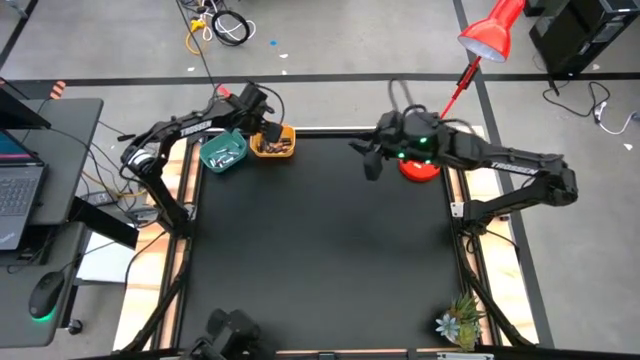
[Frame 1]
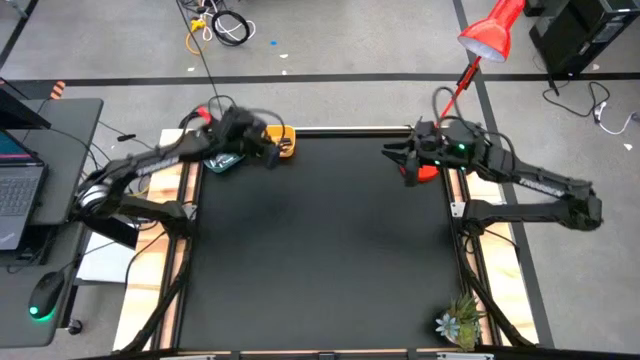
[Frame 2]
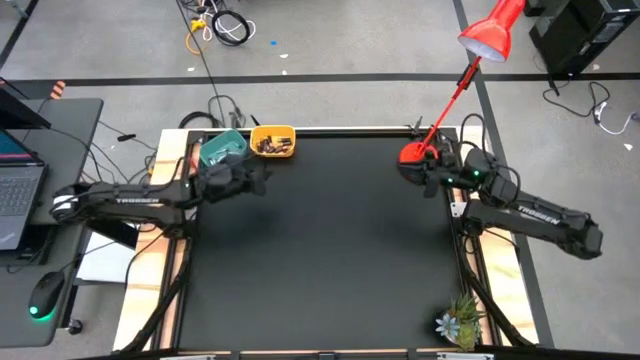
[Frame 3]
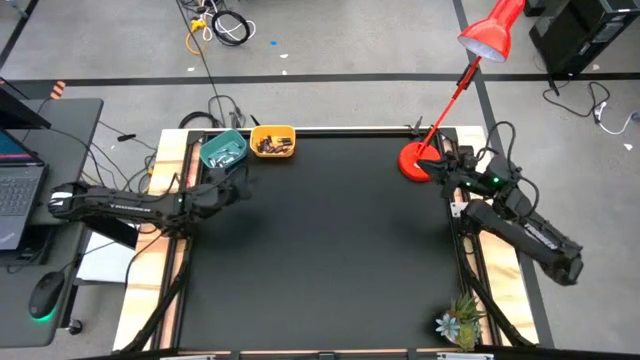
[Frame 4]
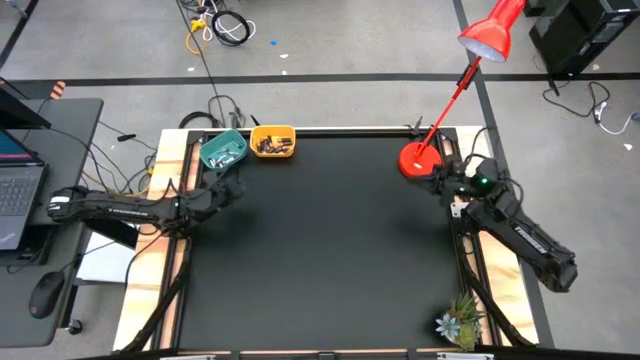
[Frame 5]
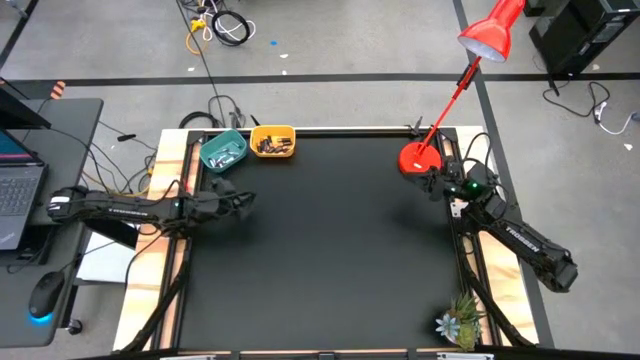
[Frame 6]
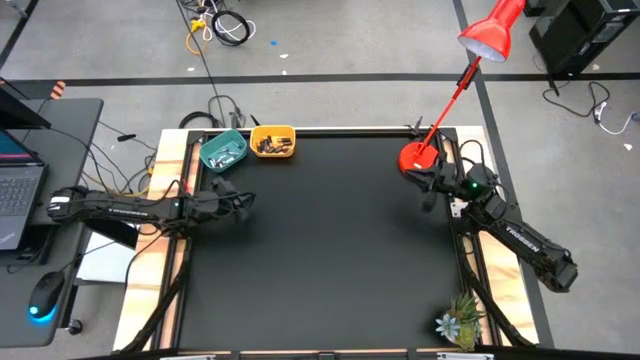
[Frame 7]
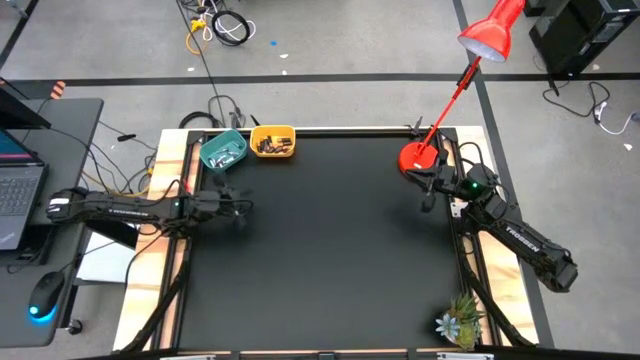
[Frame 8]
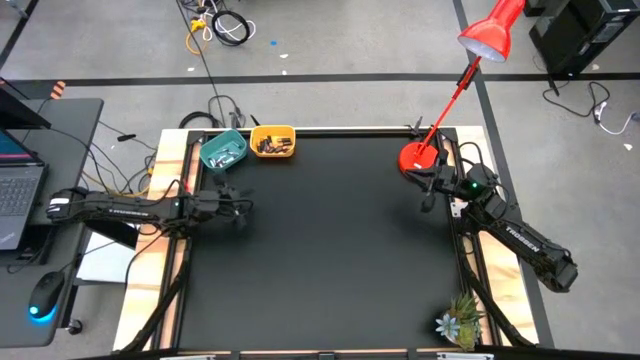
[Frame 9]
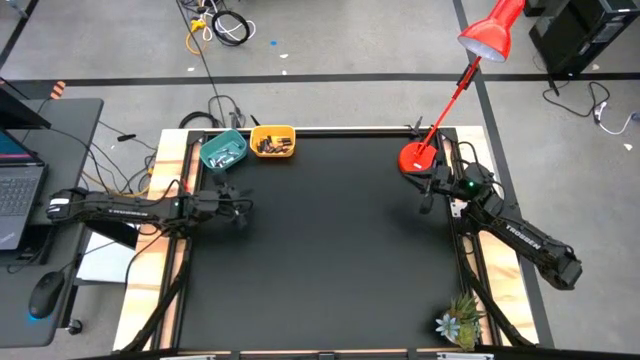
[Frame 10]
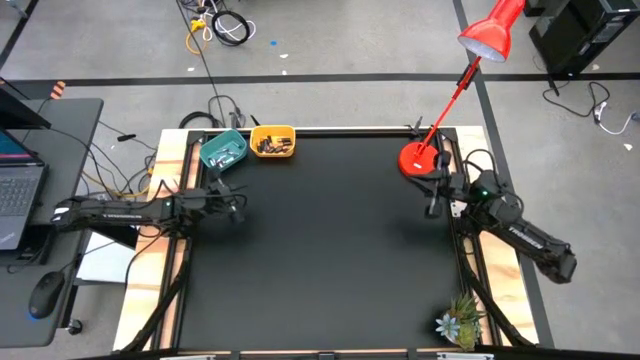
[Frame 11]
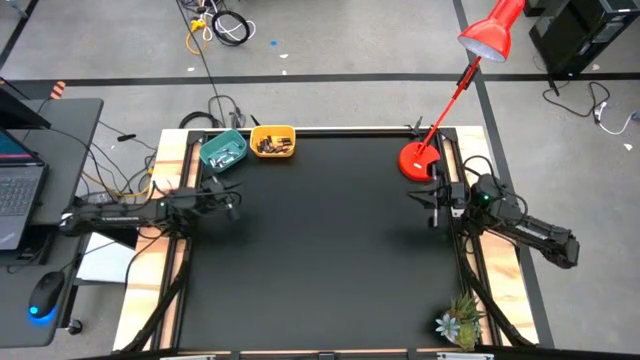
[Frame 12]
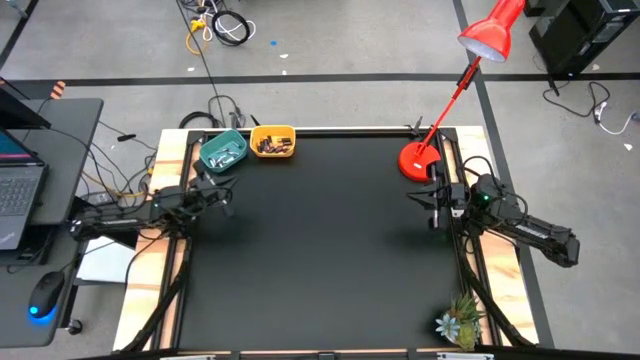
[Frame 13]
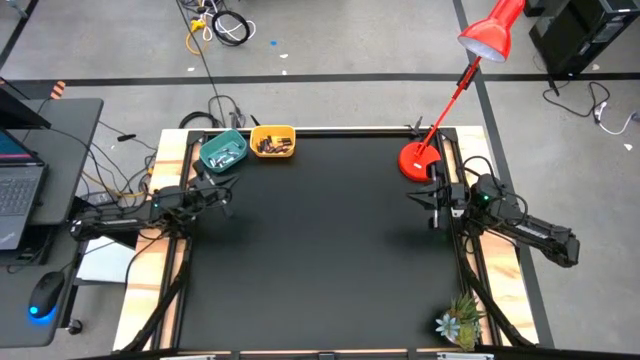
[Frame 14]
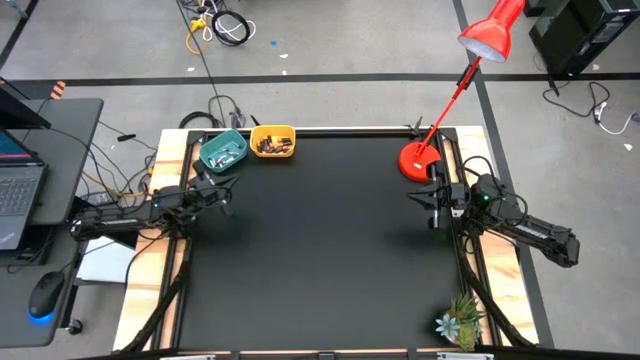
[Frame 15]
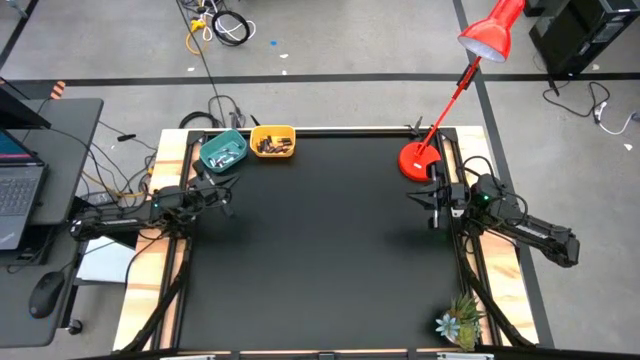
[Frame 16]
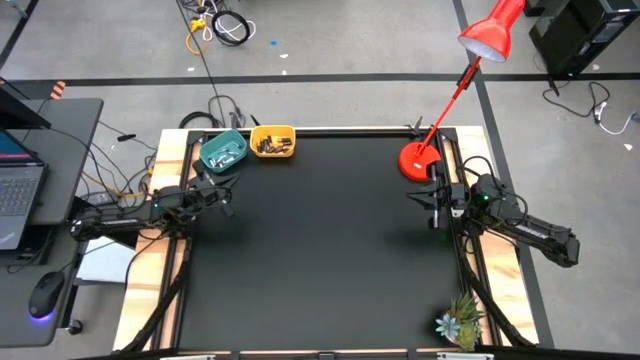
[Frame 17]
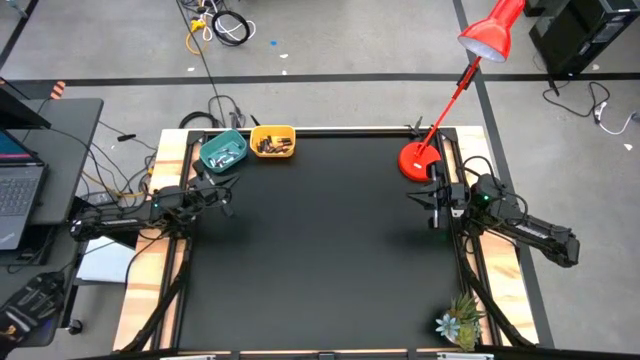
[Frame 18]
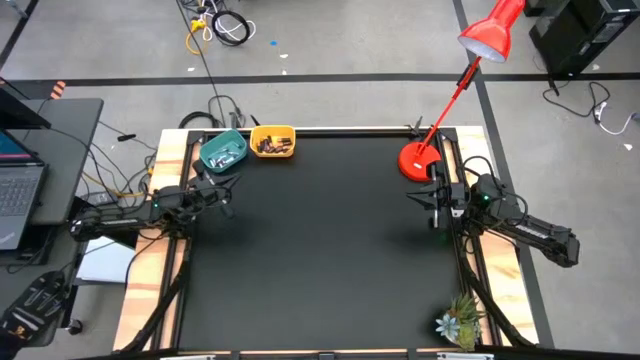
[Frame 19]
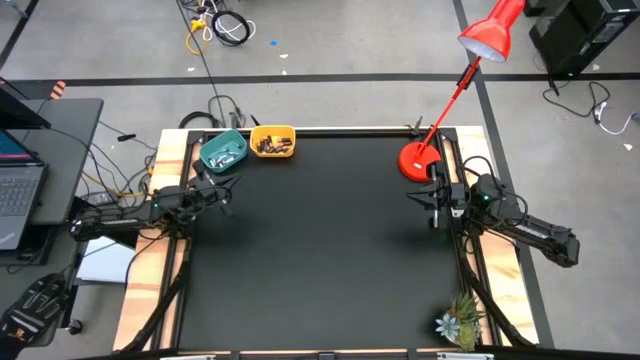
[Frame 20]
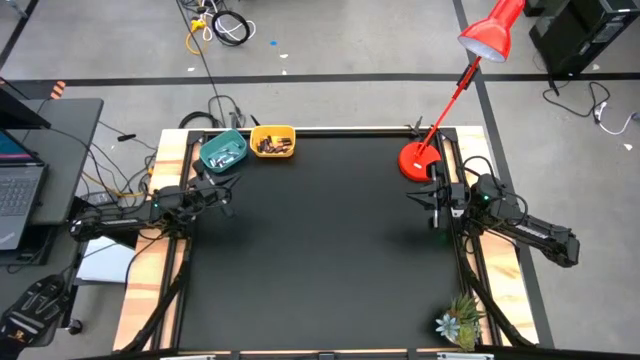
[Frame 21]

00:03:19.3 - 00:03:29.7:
Task: Sort batteries
Return to Home Position

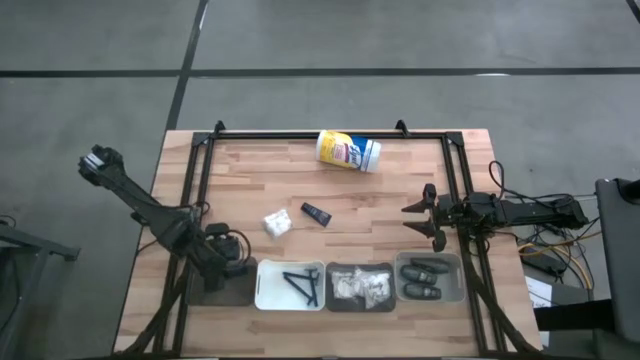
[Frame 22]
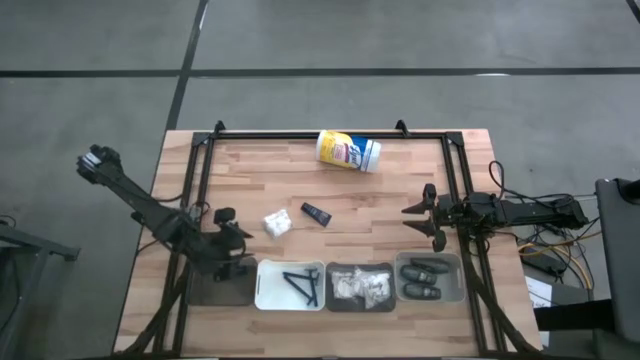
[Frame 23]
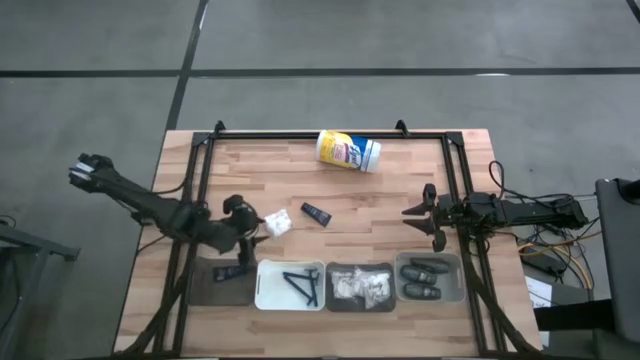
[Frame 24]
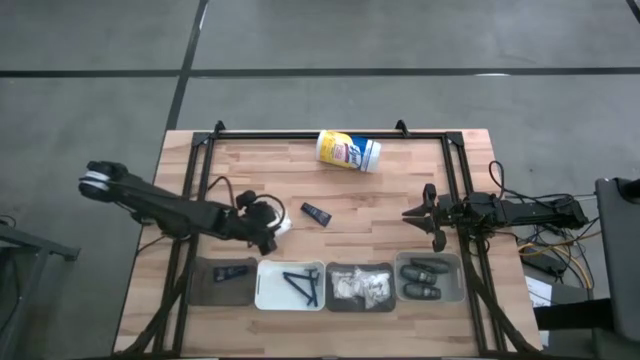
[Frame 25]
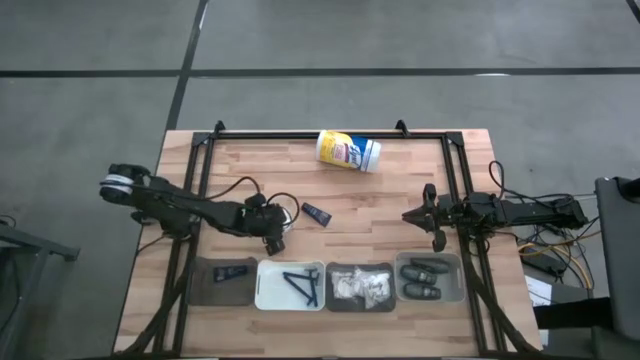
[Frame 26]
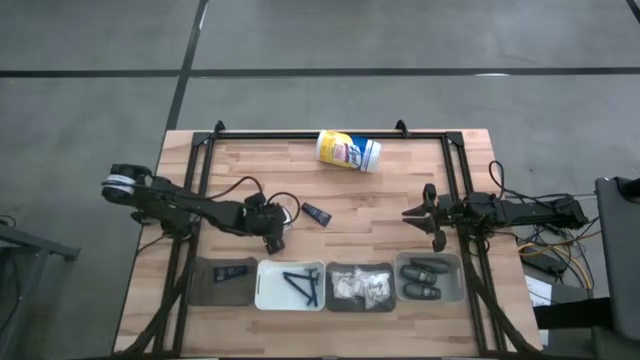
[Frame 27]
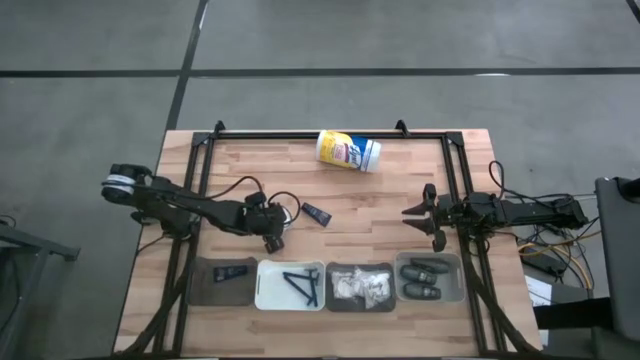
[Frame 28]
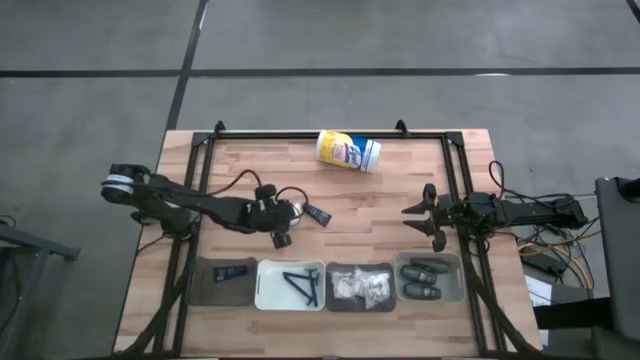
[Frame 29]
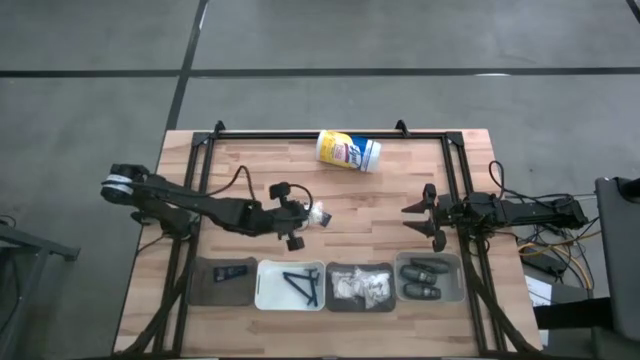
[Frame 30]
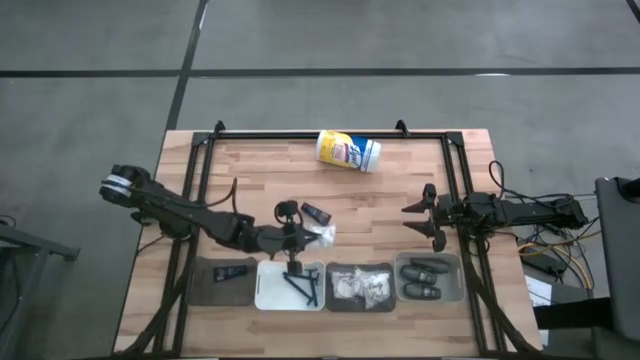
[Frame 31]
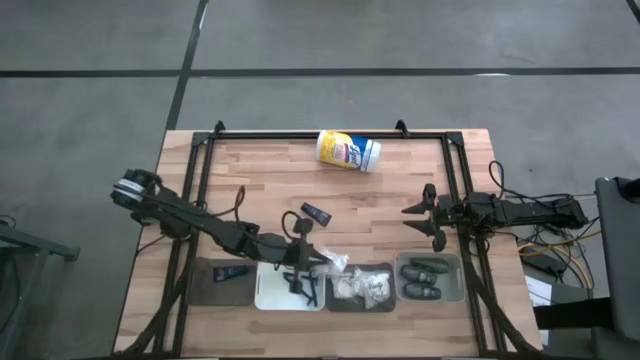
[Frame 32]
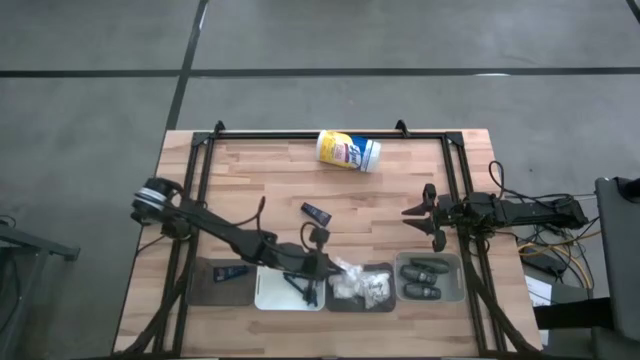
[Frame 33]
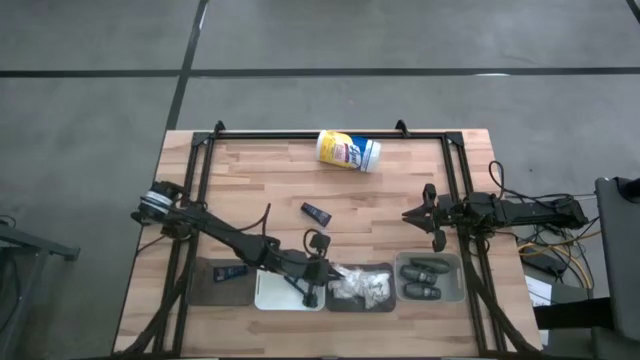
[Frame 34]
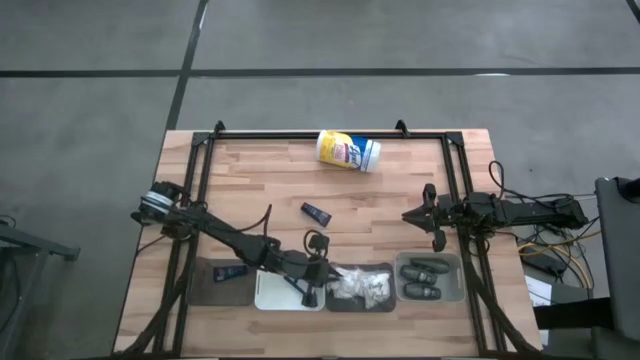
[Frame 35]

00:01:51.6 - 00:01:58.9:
Task: Pick & Place Travel size toiletries
Put the cotton pack into the right black bin

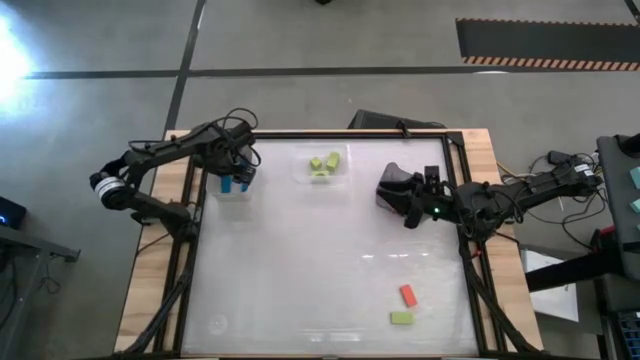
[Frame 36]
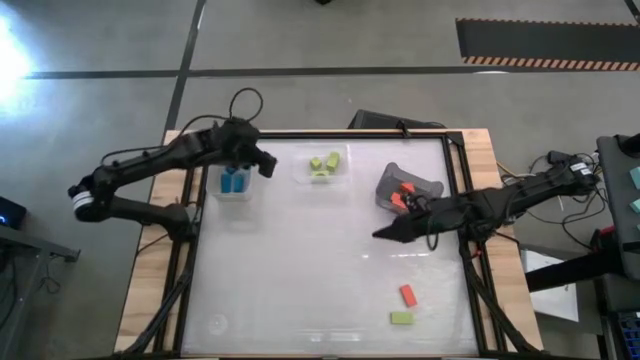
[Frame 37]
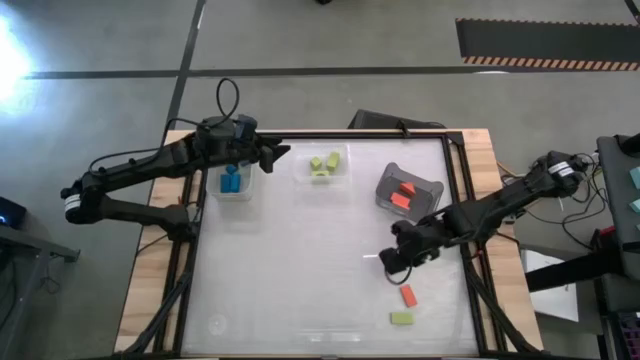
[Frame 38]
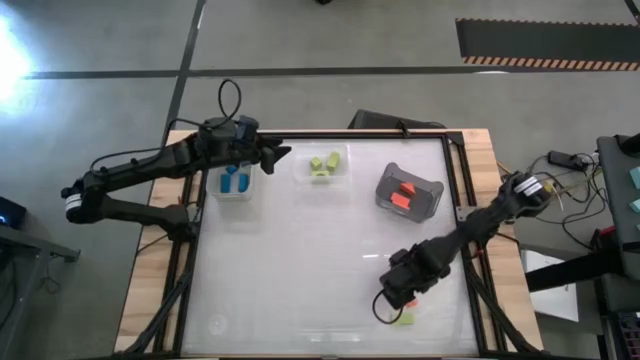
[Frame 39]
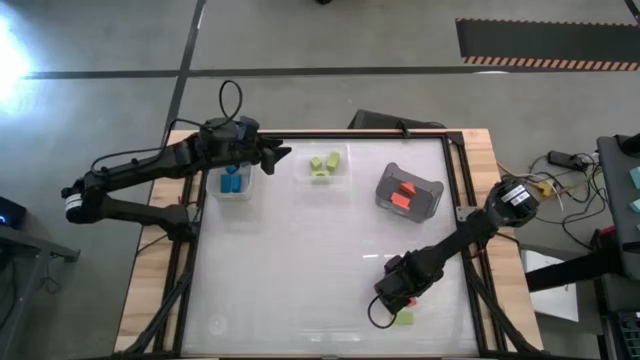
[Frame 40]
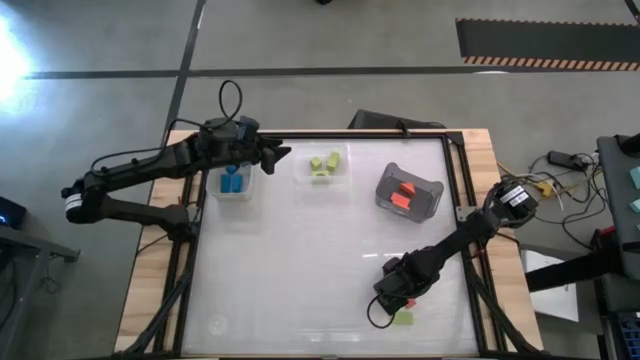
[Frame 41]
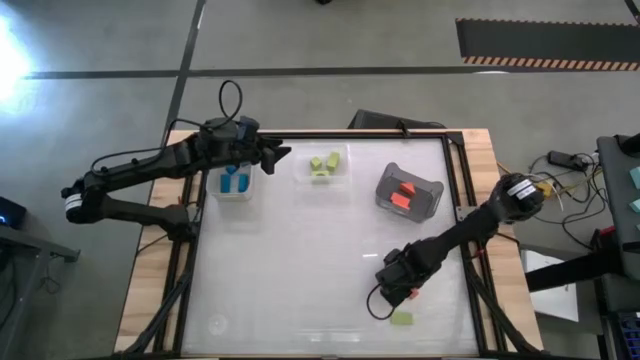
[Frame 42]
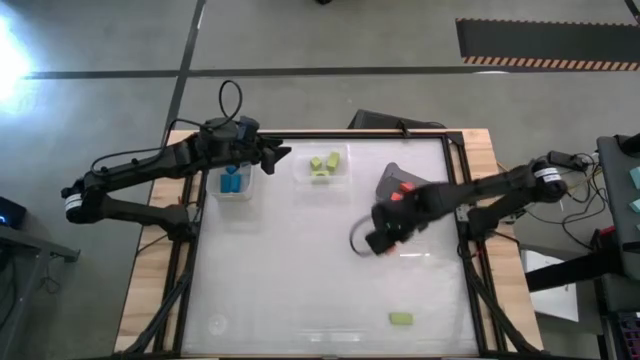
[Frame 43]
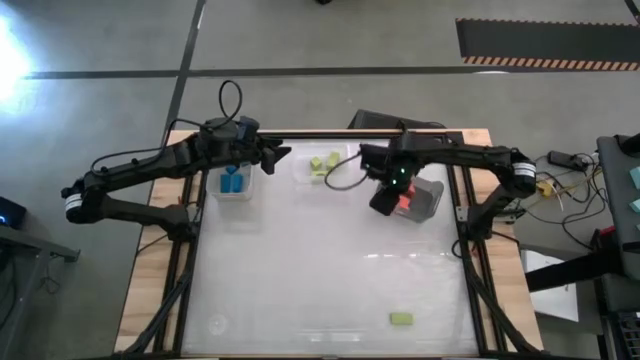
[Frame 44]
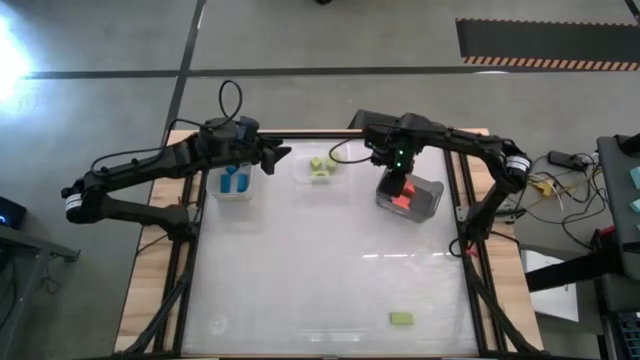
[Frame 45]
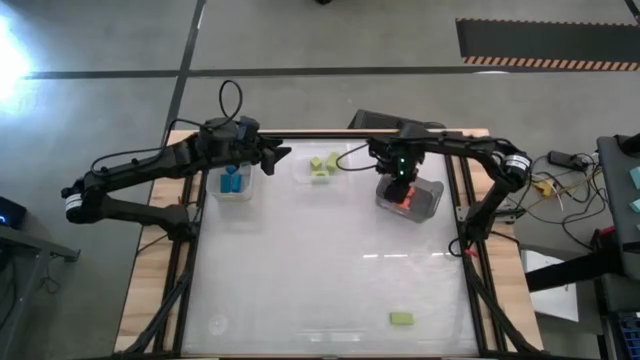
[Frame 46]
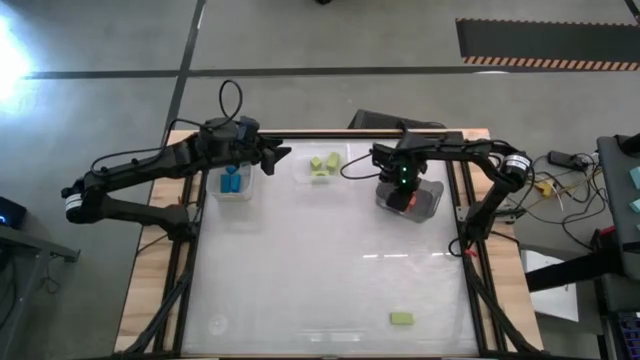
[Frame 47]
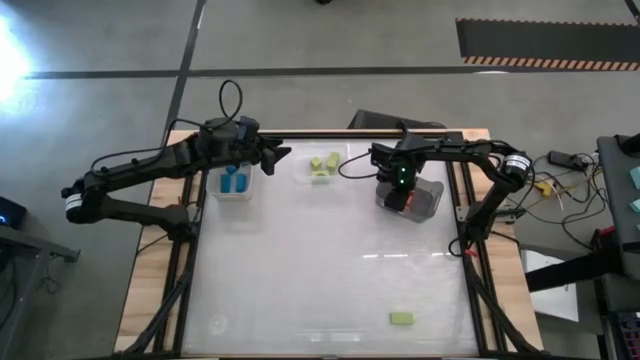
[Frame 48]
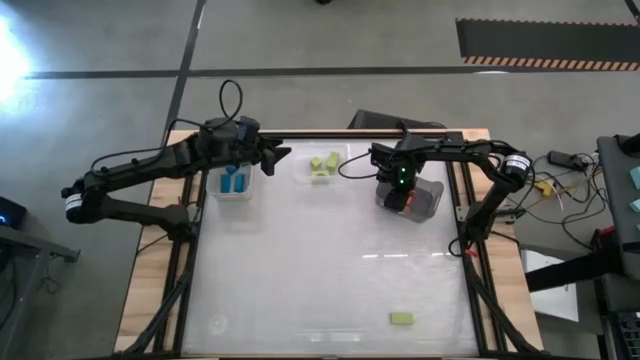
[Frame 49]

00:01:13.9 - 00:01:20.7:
Task: Sort & place blocks by color
Put the orange block into the black bin
